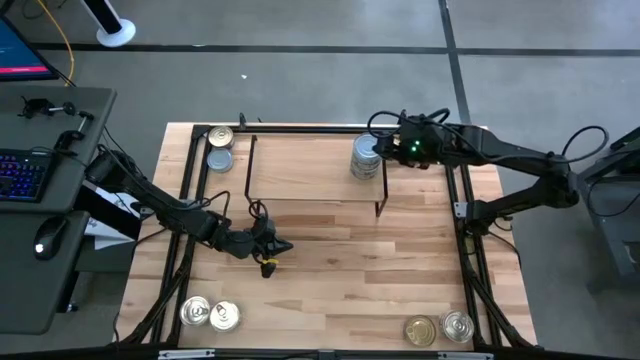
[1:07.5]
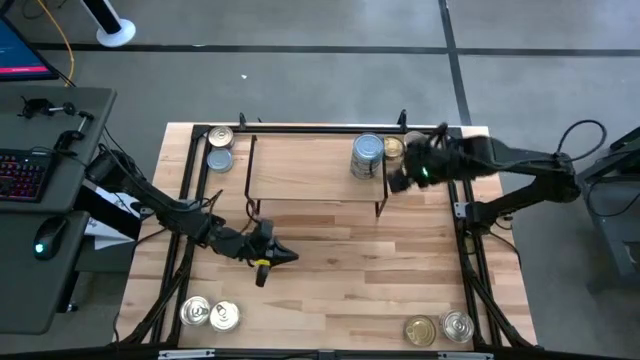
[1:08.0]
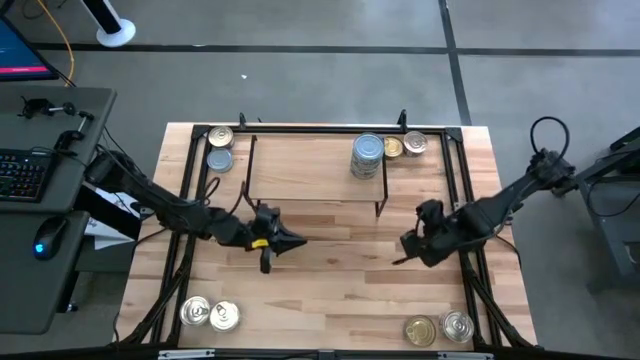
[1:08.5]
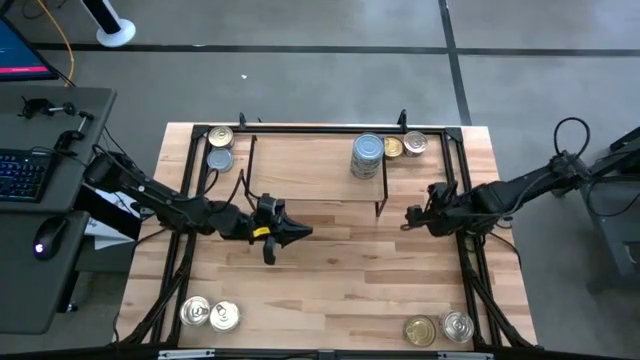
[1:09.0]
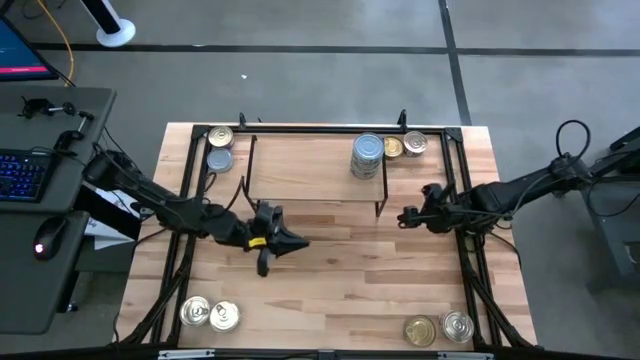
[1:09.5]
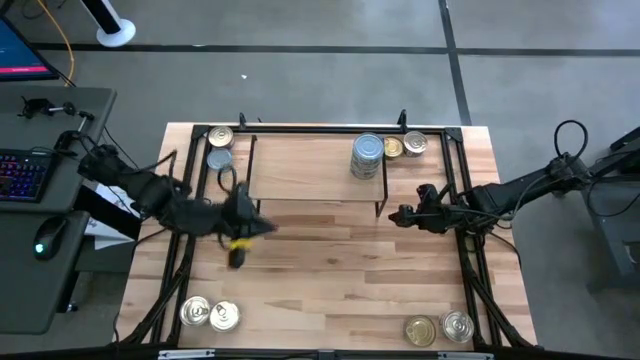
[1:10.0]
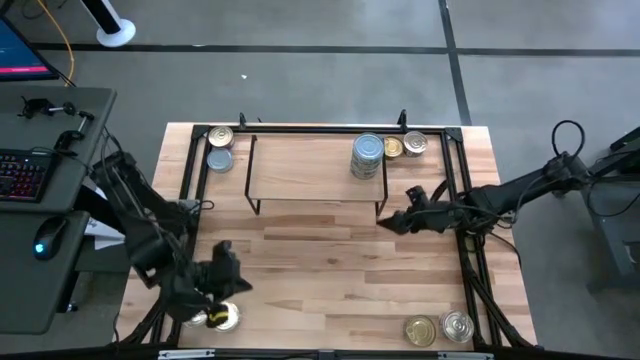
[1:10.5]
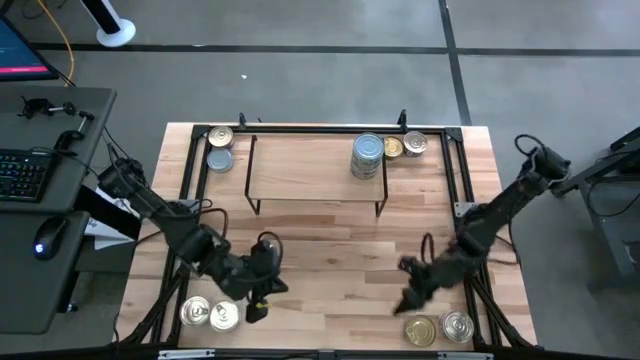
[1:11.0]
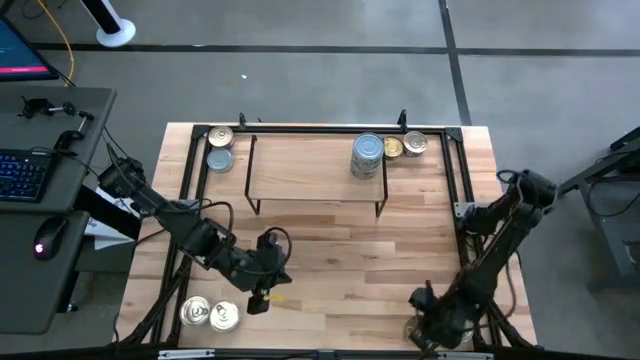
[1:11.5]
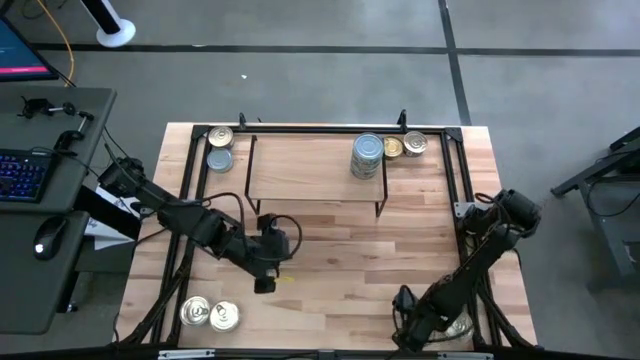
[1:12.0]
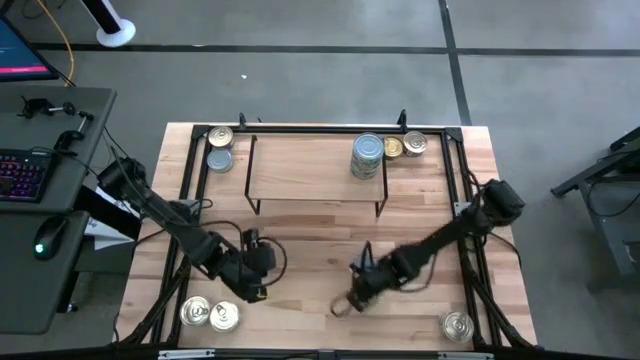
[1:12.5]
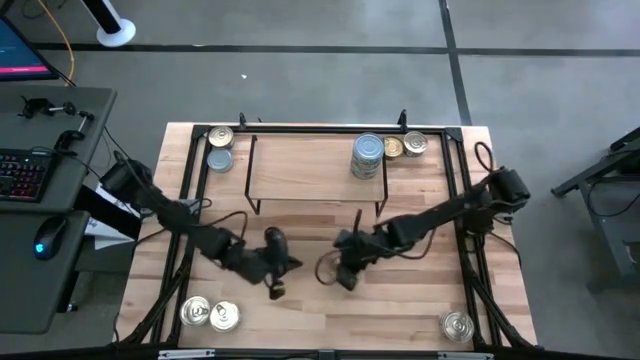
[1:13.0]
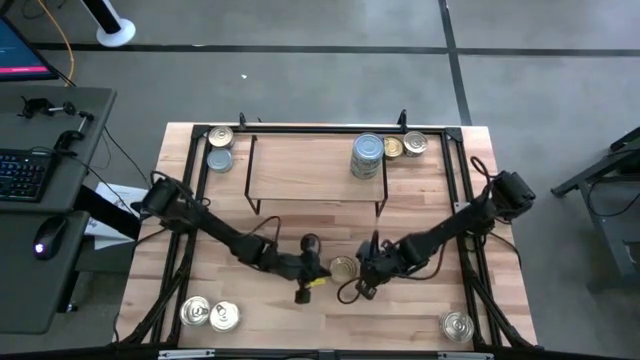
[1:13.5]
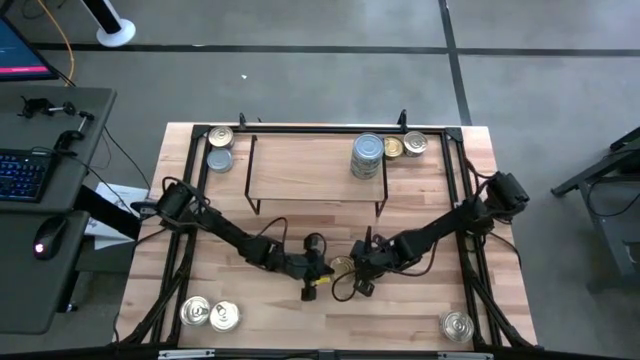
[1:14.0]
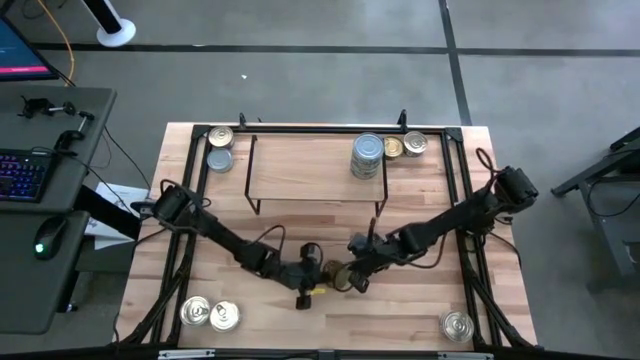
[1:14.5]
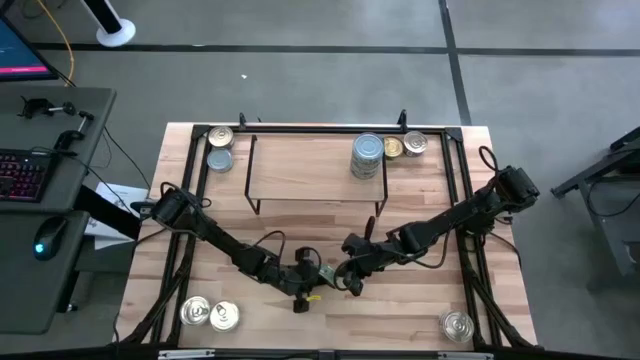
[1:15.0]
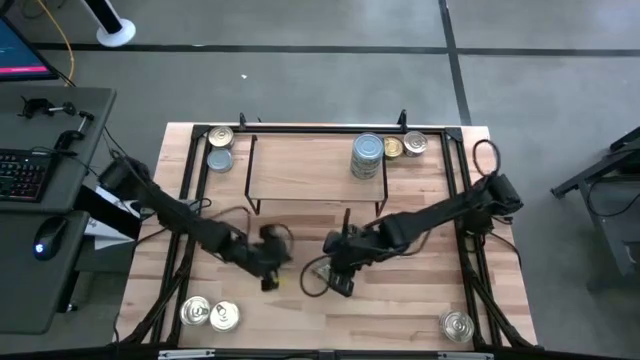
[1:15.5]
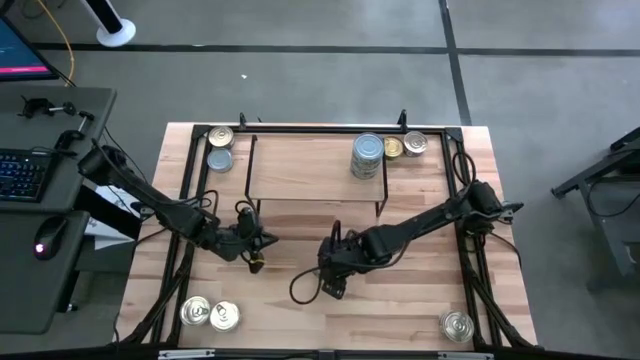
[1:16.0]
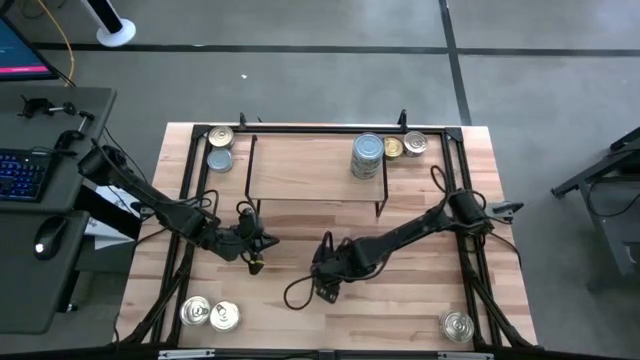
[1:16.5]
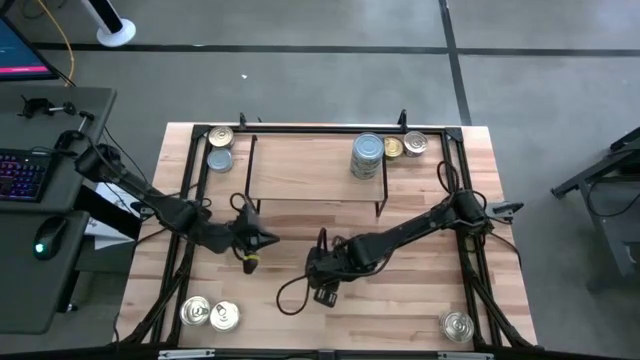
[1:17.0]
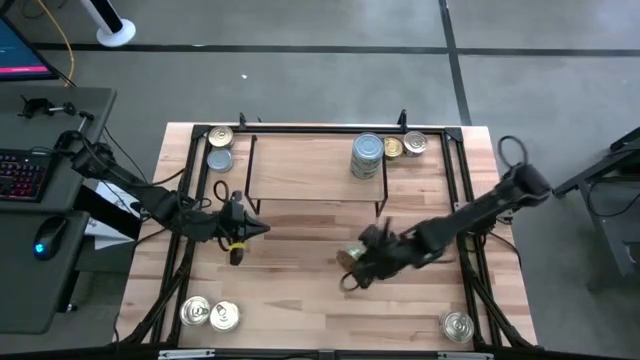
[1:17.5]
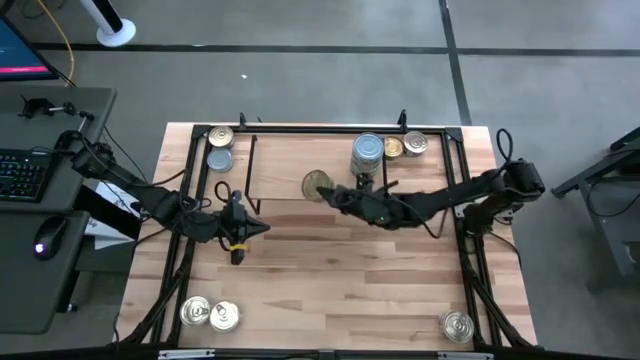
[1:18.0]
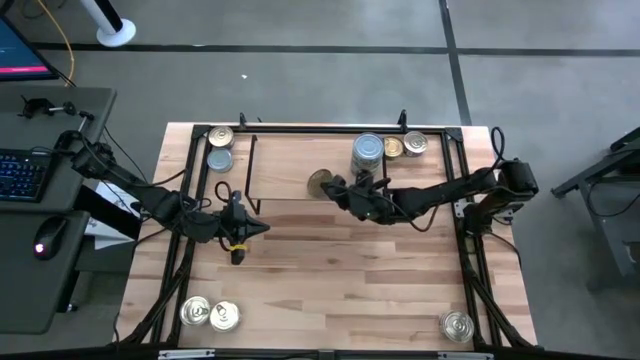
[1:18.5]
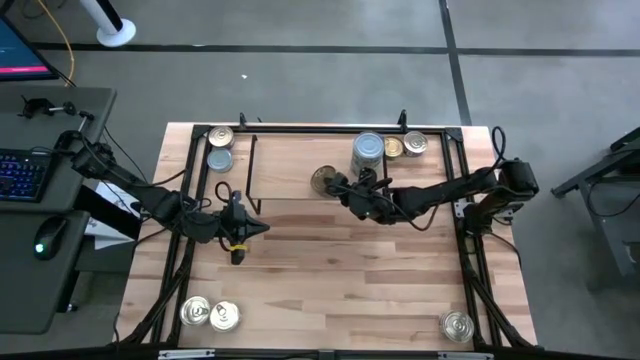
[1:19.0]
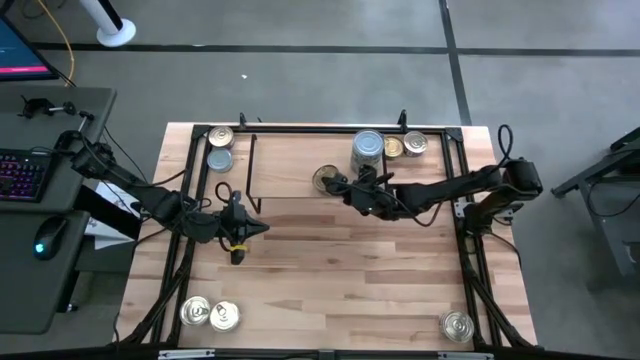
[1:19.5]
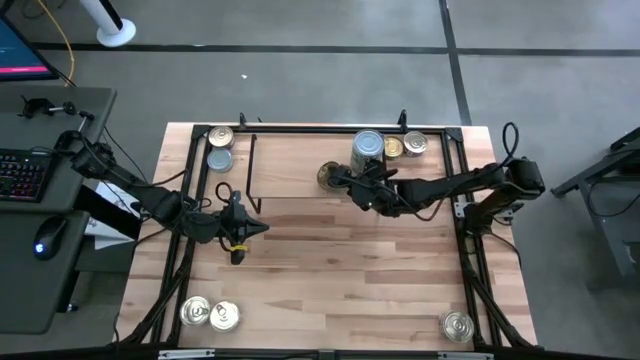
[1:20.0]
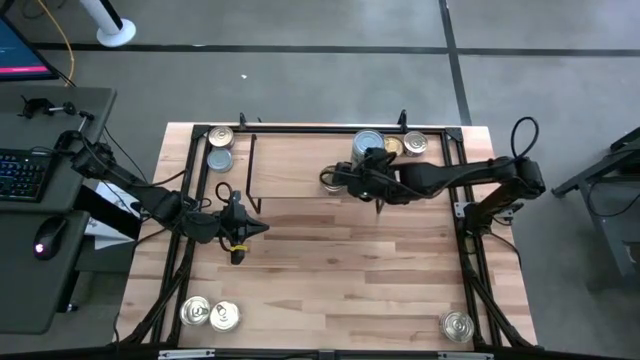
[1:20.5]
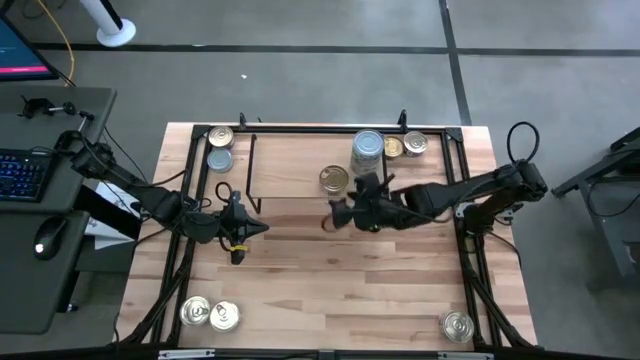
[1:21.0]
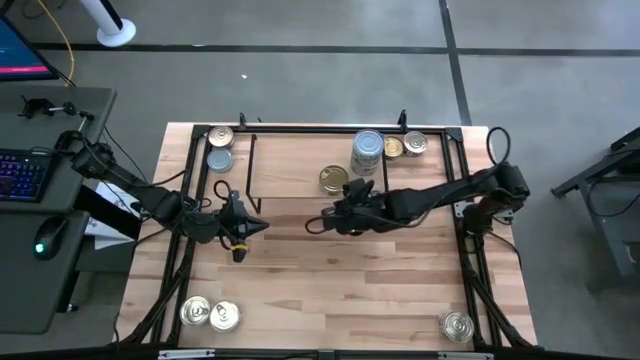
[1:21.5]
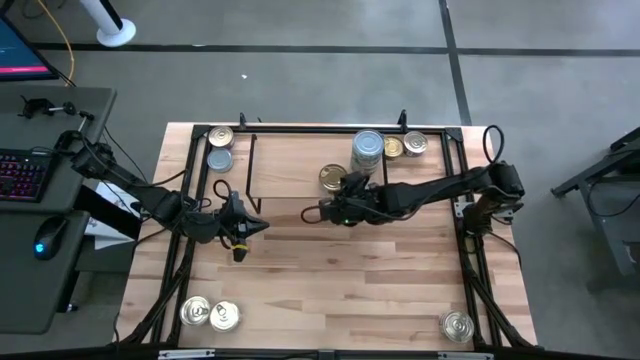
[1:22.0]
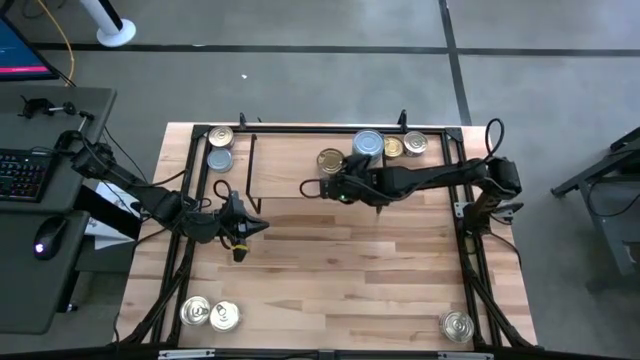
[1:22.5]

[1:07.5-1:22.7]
Task: Stack canned seafood by type on shelf
Put the green tuna can on the shelf

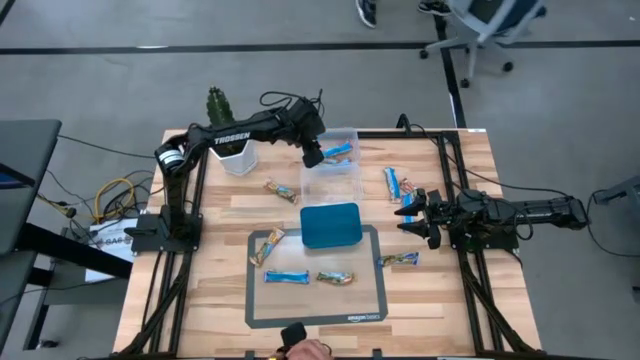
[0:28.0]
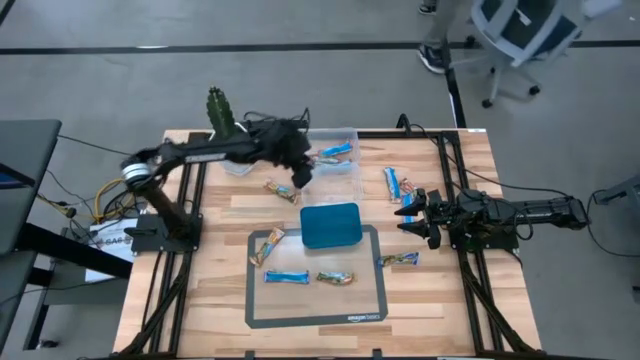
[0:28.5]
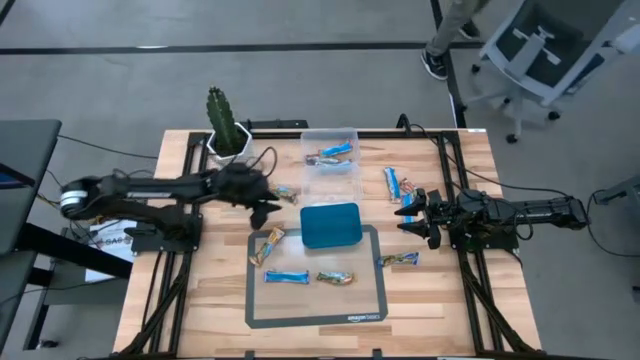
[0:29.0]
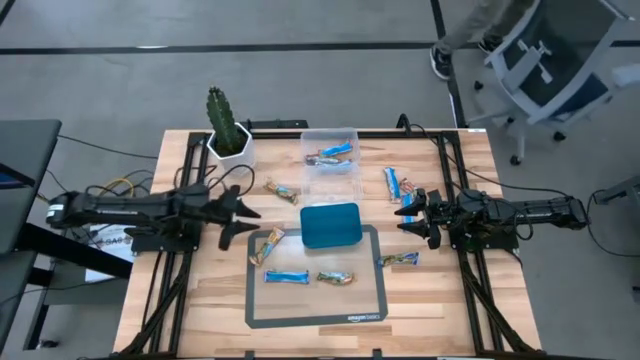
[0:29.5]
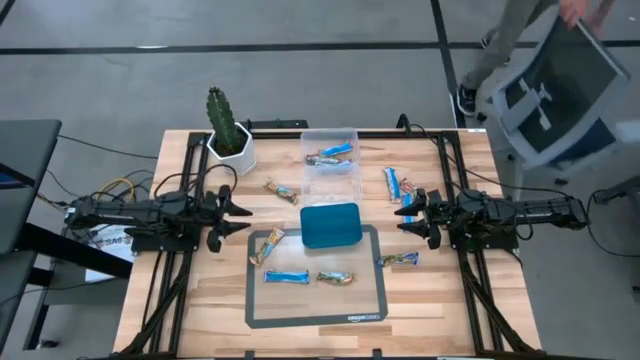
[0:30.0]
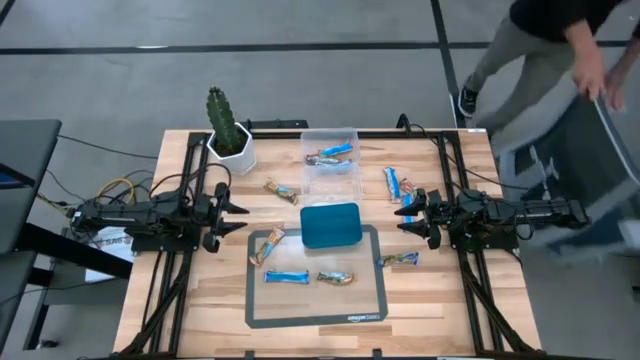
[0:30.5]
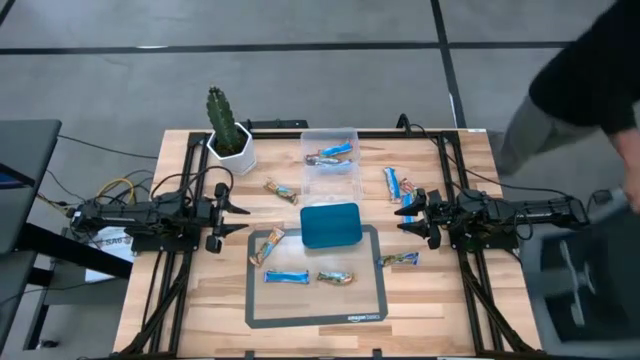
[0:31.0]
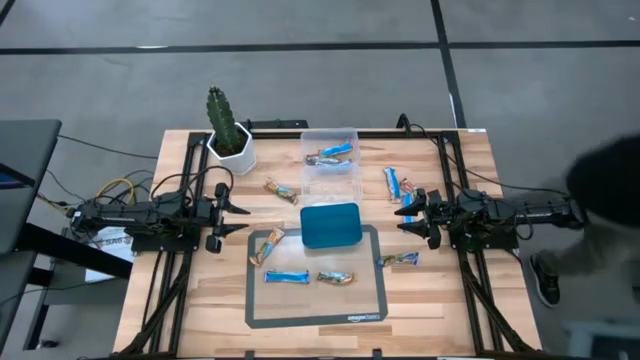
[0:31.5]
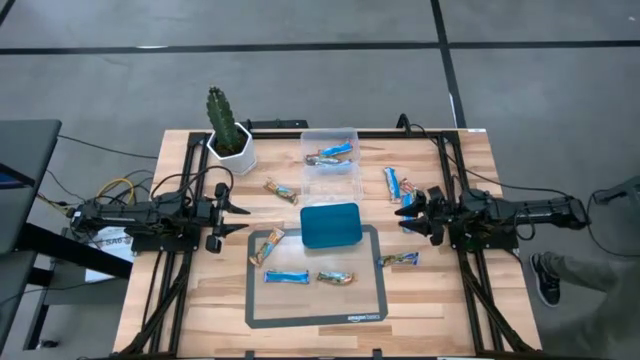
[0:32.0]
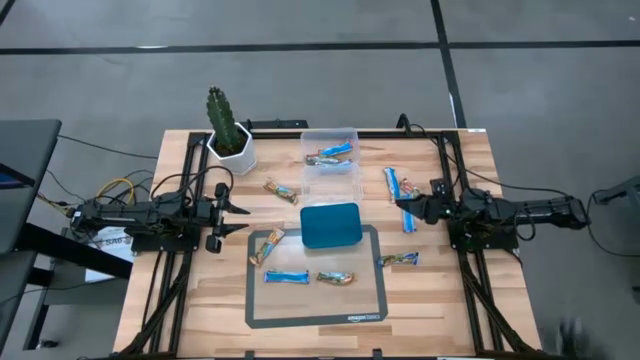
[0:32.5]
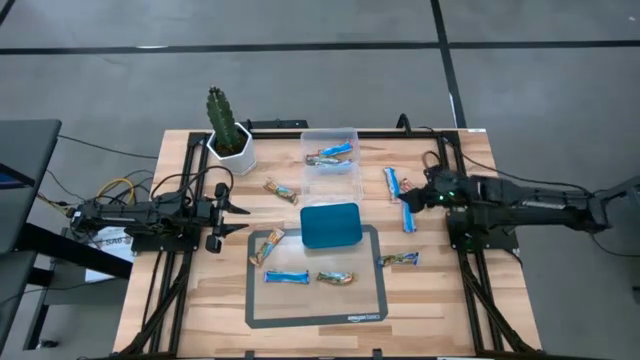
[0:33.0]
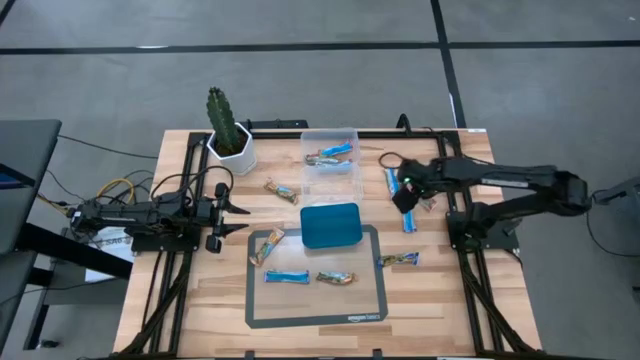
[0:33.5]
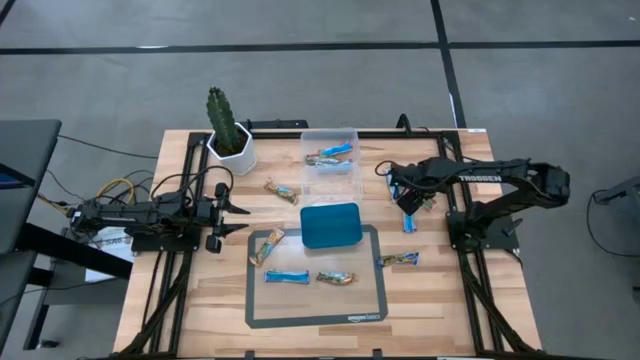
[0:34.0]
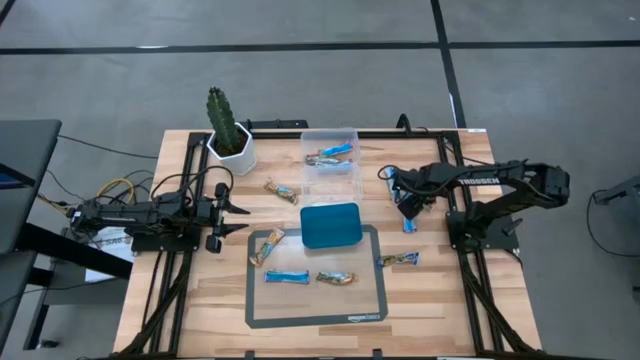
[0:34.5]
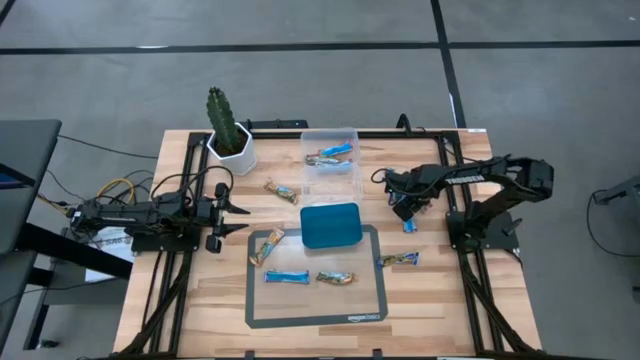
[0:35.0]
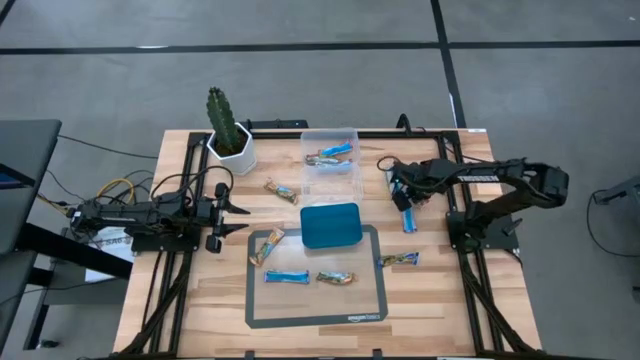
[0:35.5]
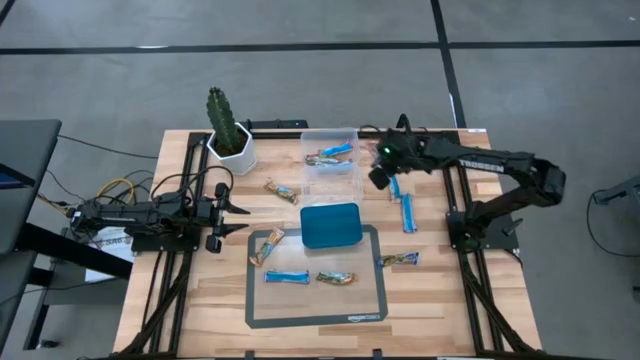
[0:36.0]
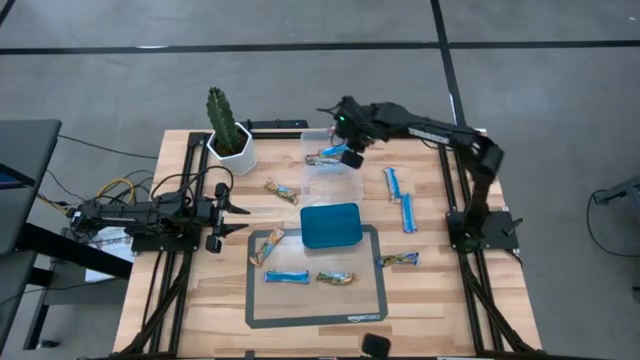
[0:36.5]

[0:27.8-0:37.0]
Task: Pick and place Granola Bars by type
Put the red granola bar into the top transparent bin
